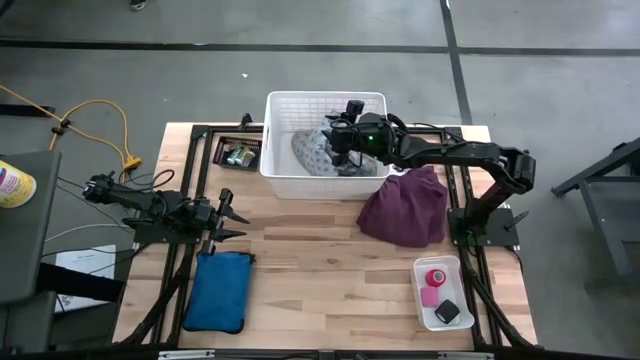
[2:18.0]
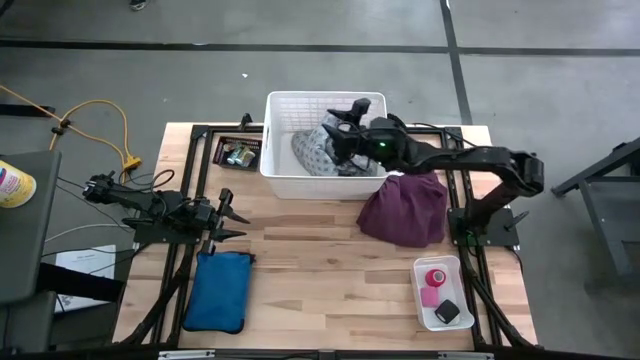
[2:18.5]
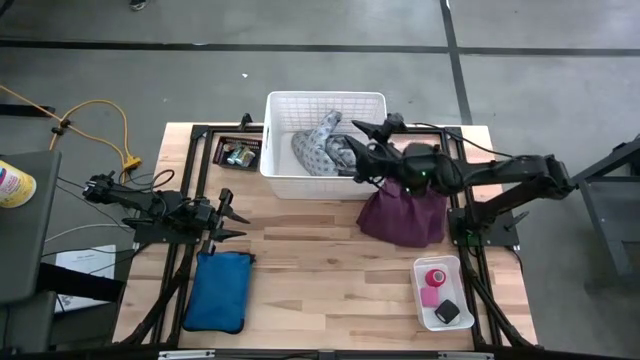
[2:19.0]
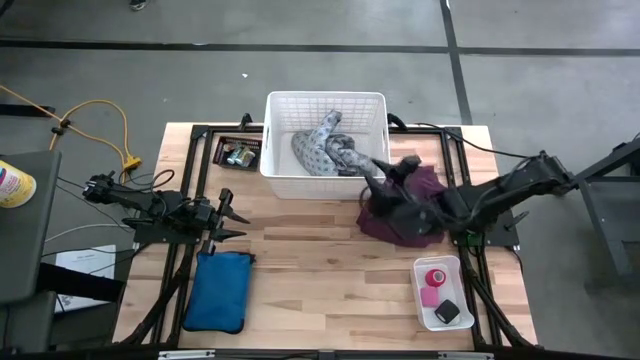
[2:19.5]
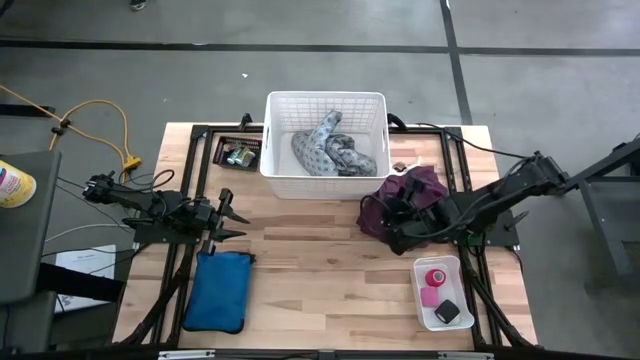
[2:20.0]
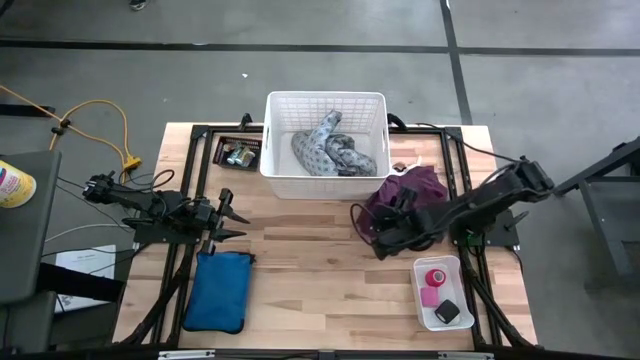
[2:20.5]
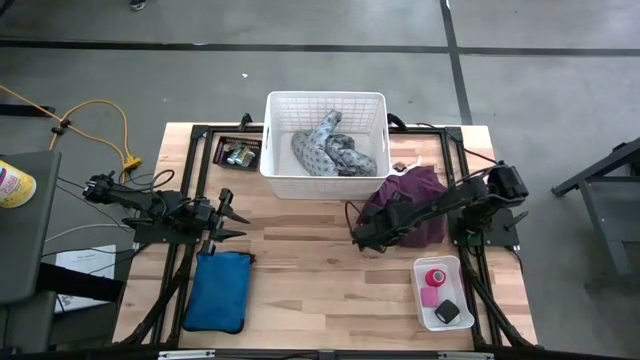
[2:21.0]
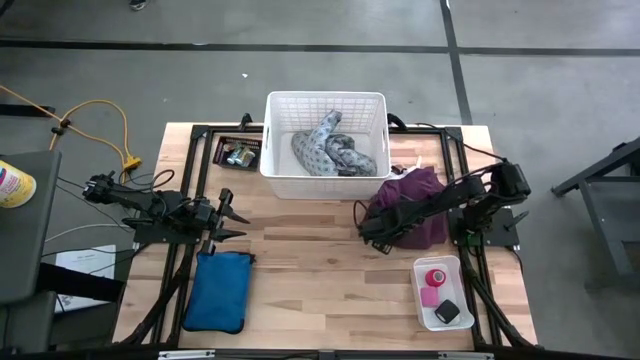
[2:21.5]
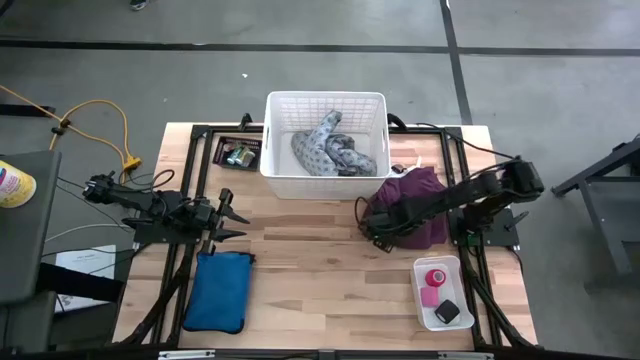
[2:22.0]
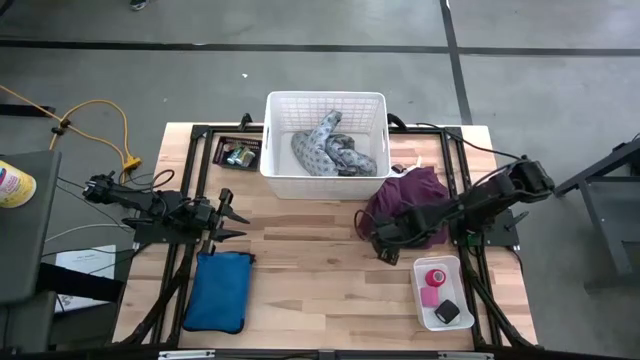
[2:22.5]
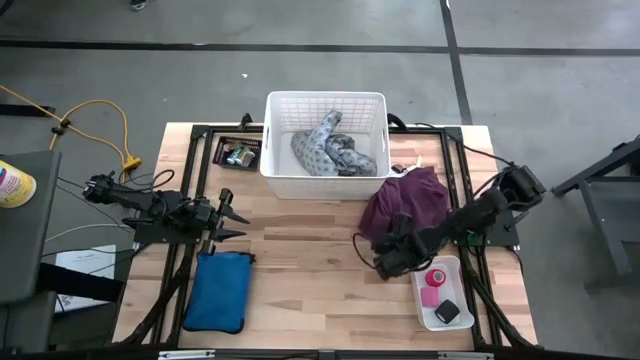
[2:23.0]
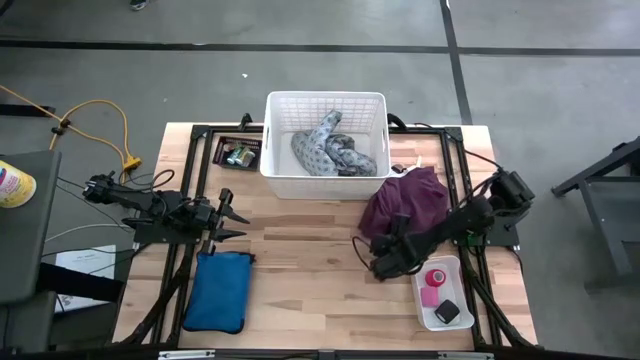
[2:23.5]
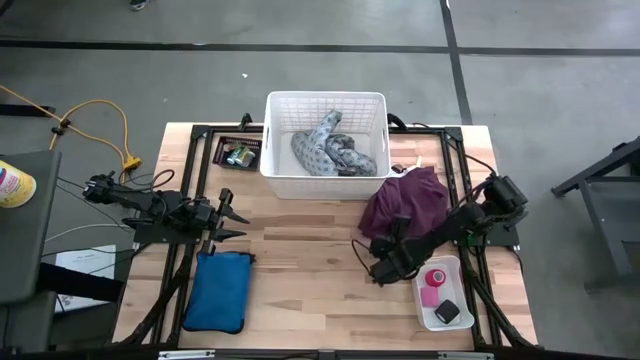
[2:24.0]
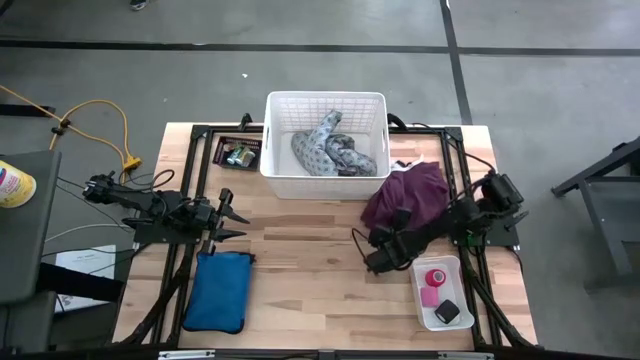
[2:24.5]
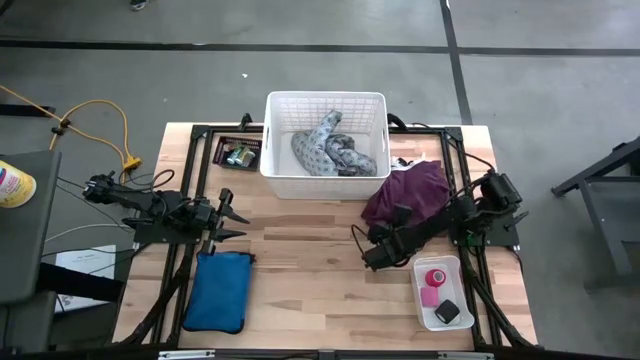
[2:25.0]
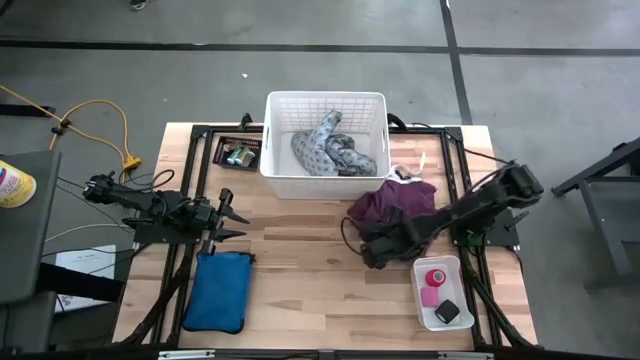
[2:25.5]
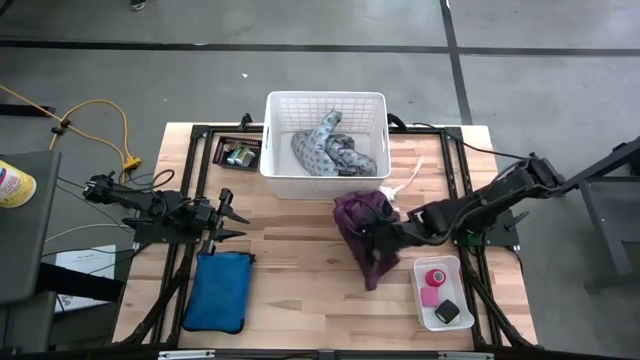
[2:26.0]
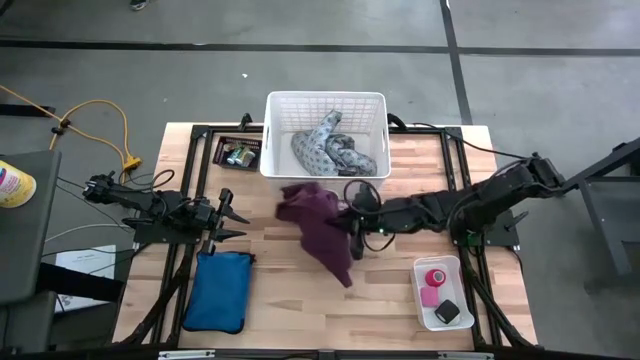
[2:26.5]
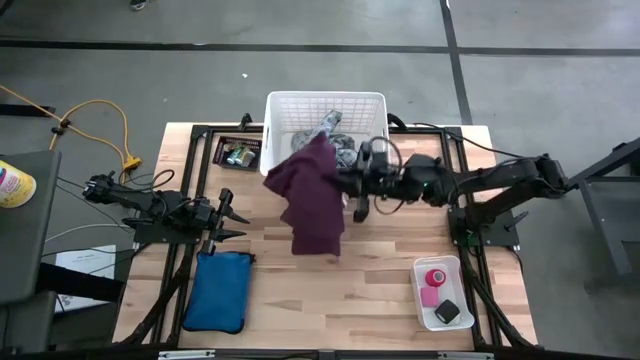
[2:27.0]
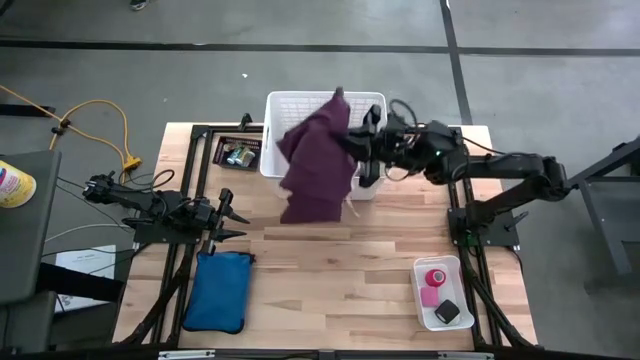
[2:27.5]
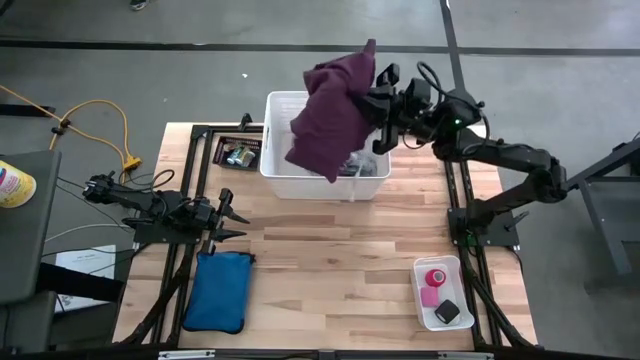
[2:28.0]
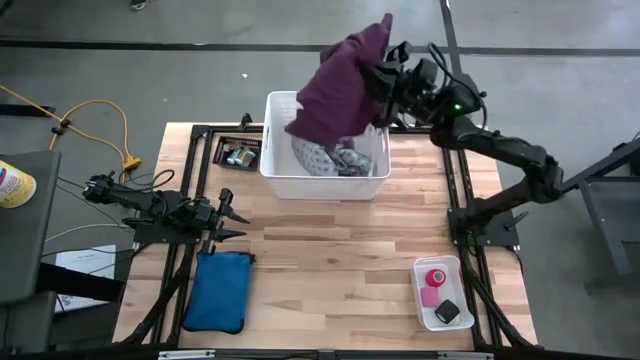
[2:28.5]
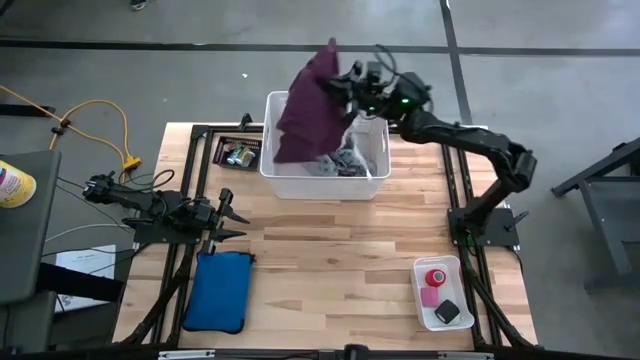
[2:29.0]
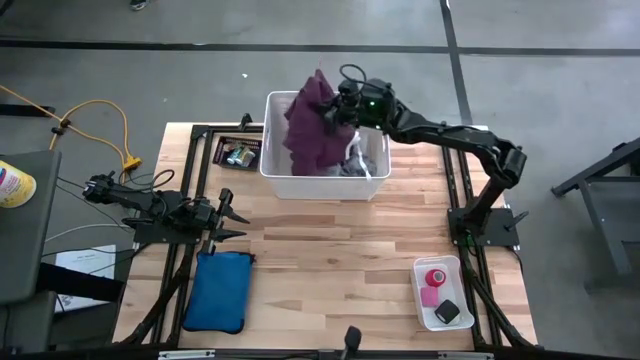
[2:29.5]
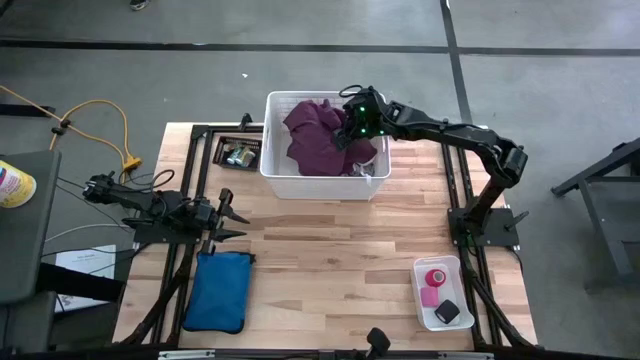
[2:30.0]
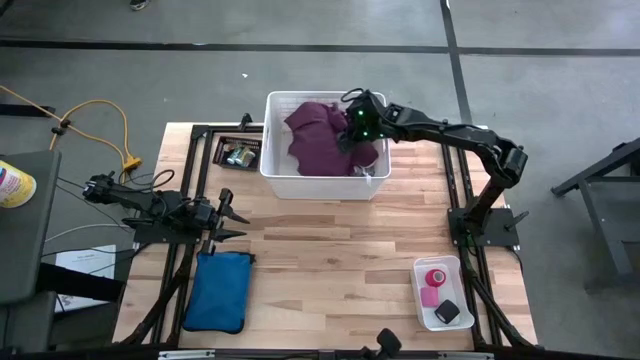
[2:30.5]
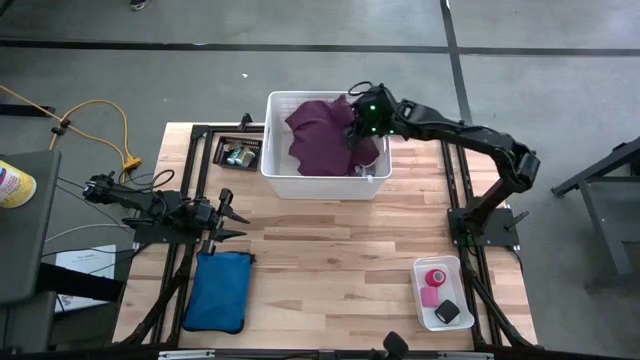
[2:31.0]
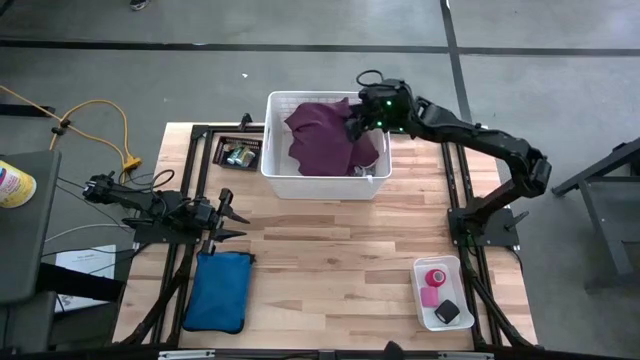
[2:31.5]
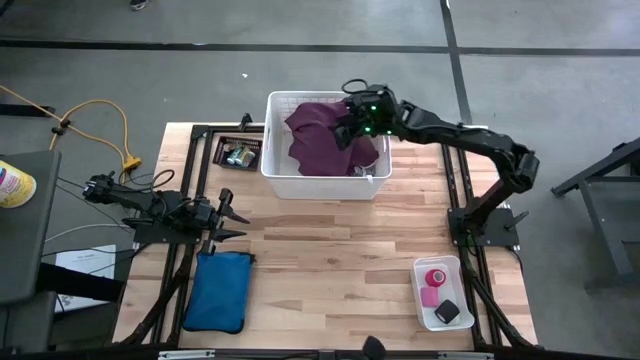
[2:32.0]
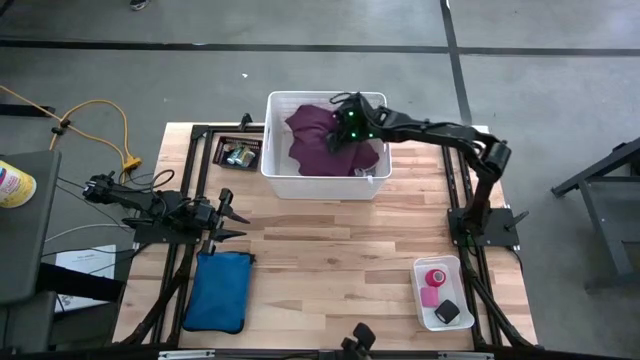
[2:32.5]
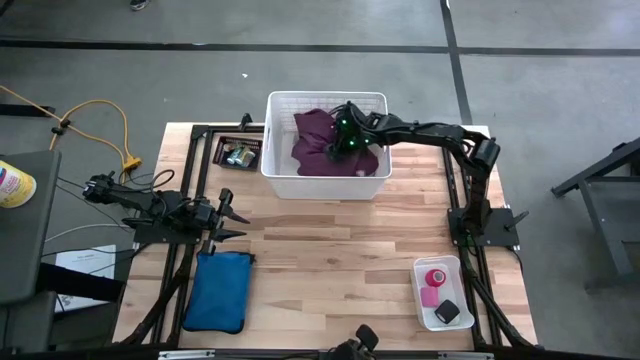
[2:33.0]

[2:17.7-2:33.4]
Task: Pick & place medical supplies in basket/bin
Put the maroon patient gown into the large white bin
